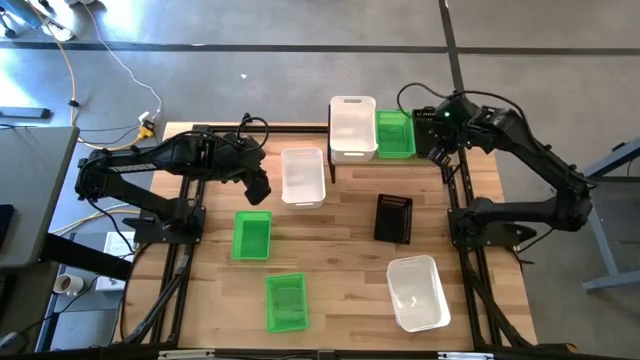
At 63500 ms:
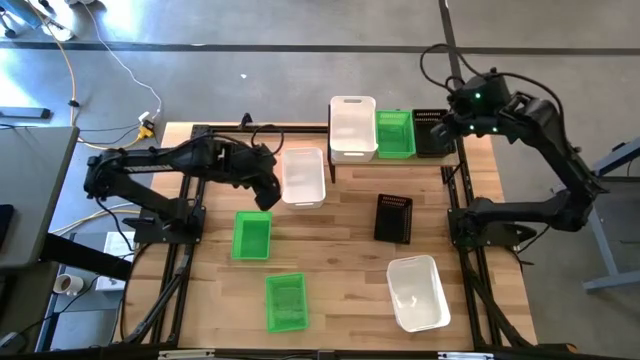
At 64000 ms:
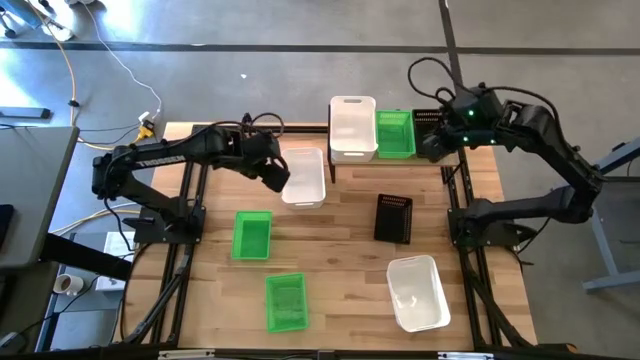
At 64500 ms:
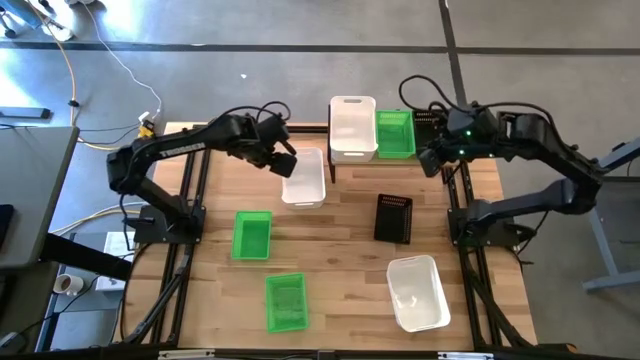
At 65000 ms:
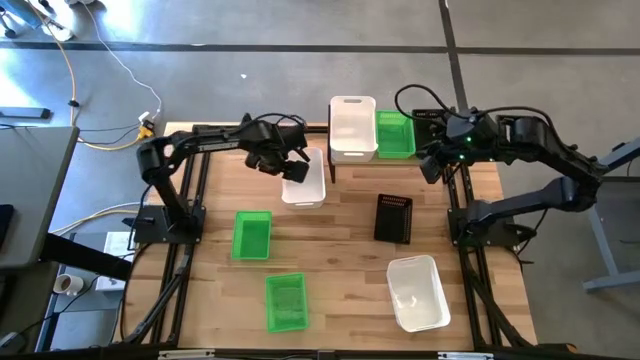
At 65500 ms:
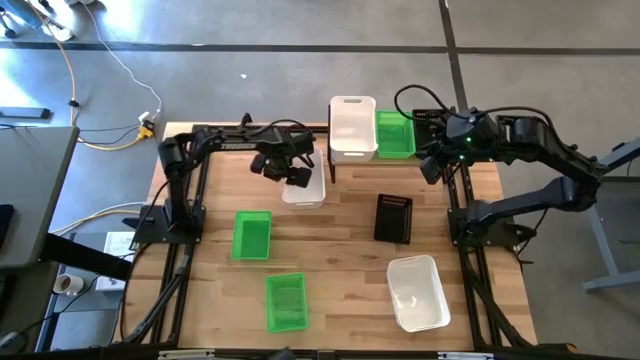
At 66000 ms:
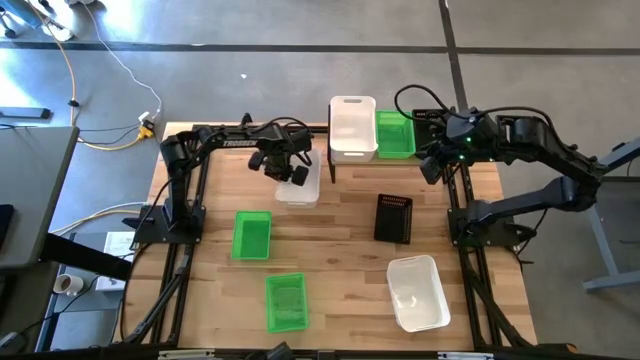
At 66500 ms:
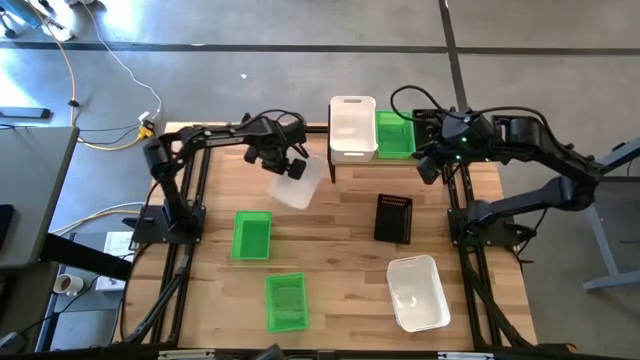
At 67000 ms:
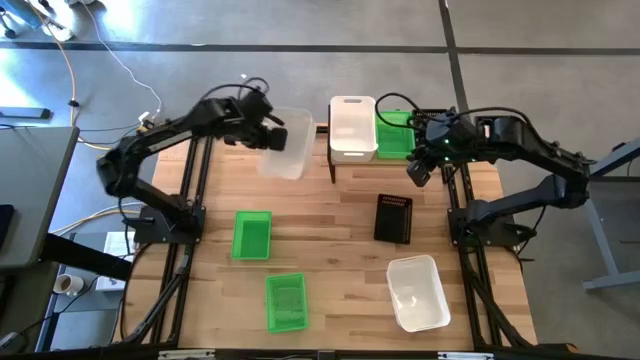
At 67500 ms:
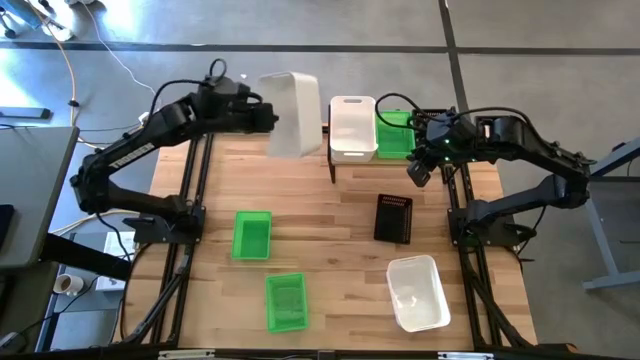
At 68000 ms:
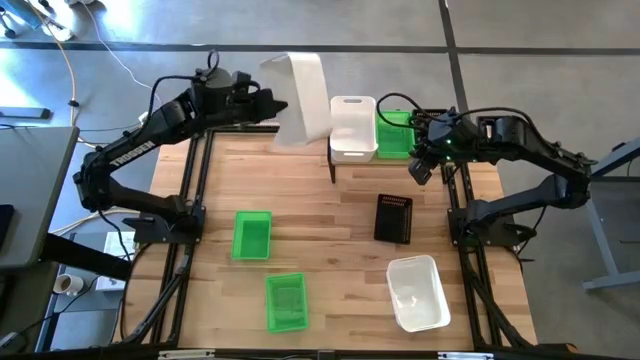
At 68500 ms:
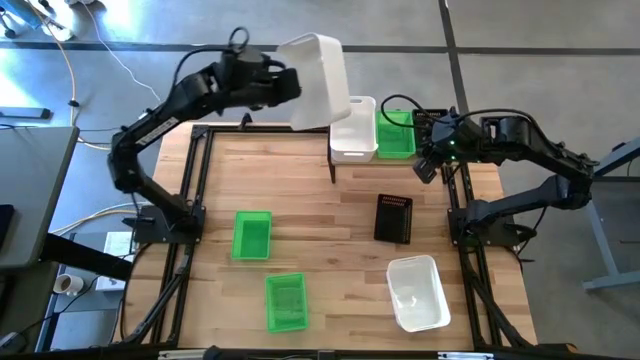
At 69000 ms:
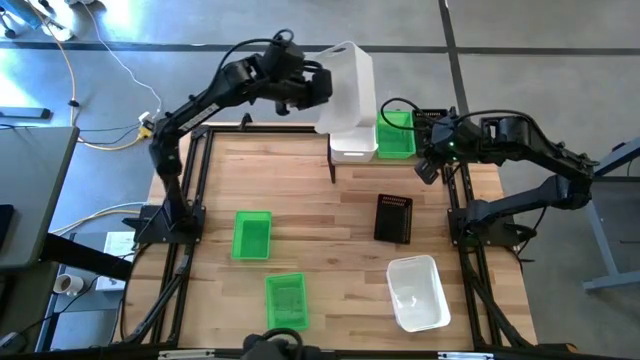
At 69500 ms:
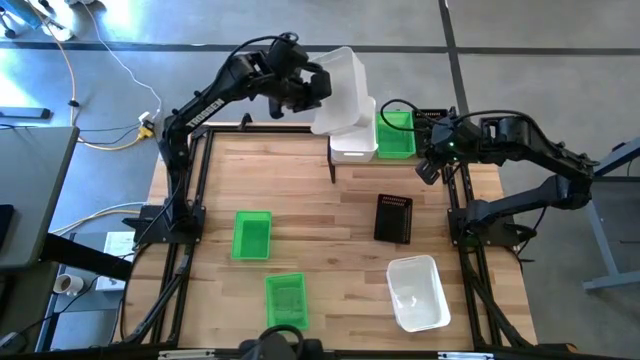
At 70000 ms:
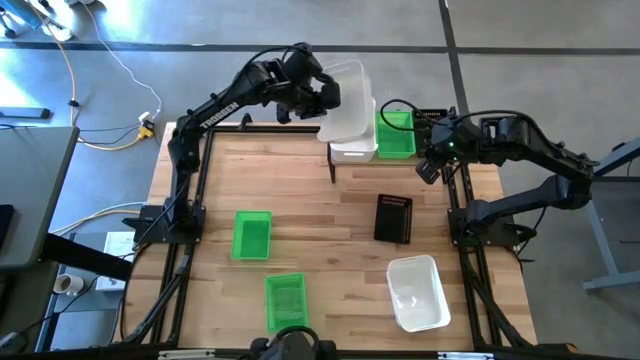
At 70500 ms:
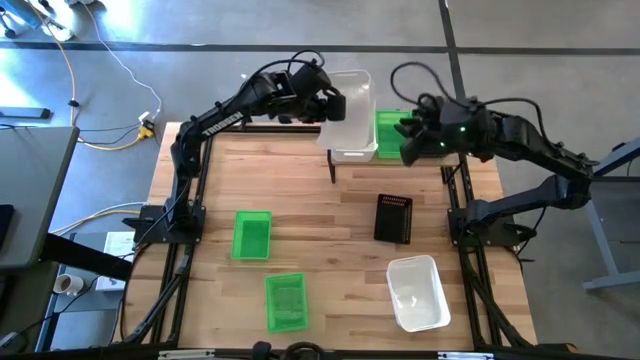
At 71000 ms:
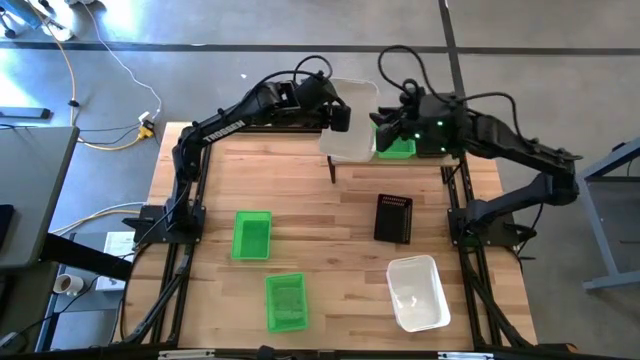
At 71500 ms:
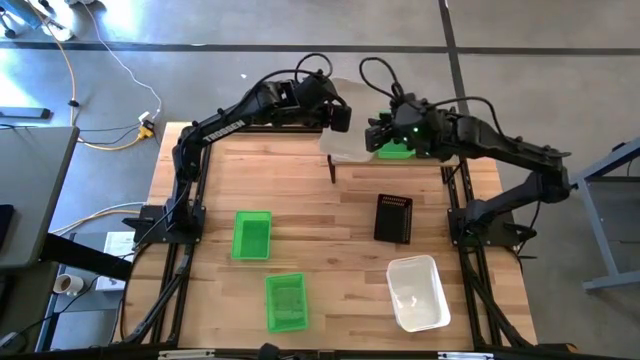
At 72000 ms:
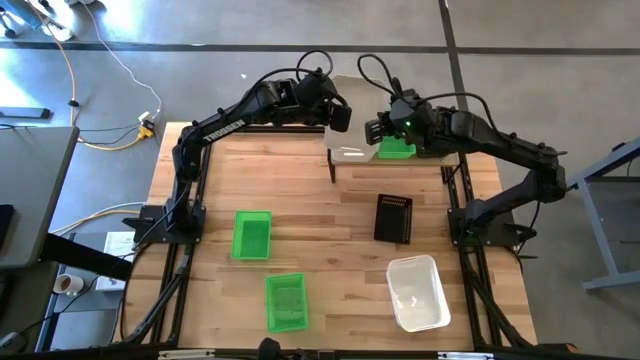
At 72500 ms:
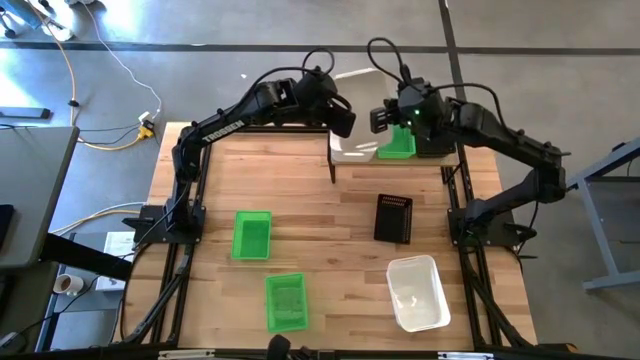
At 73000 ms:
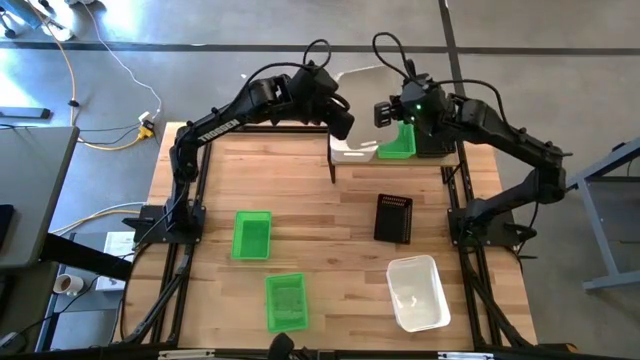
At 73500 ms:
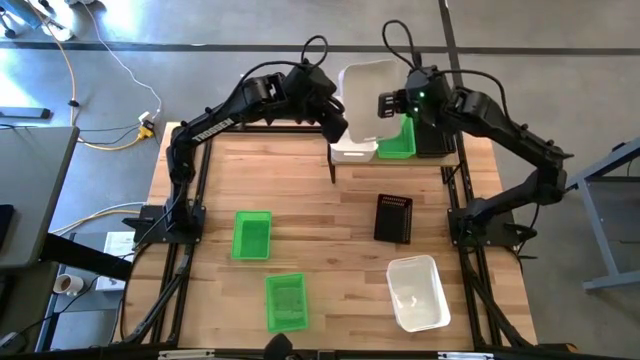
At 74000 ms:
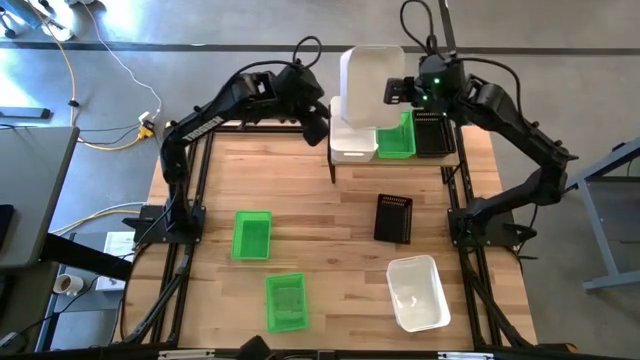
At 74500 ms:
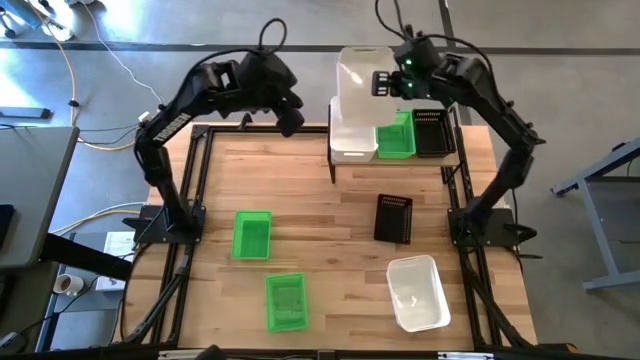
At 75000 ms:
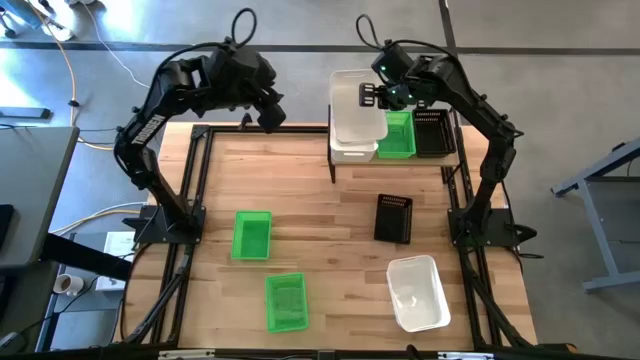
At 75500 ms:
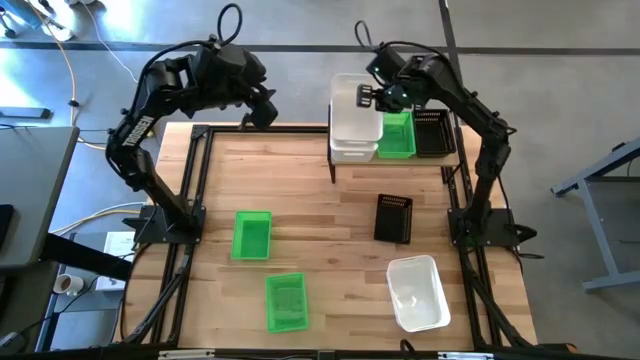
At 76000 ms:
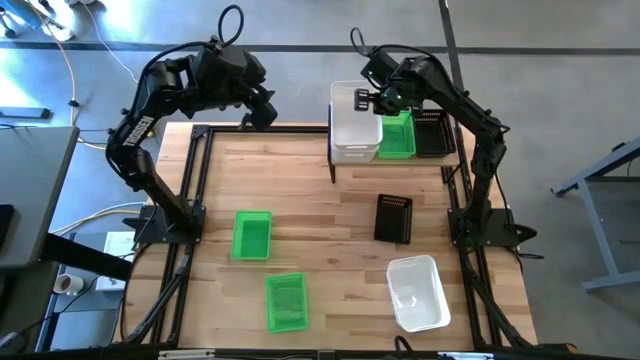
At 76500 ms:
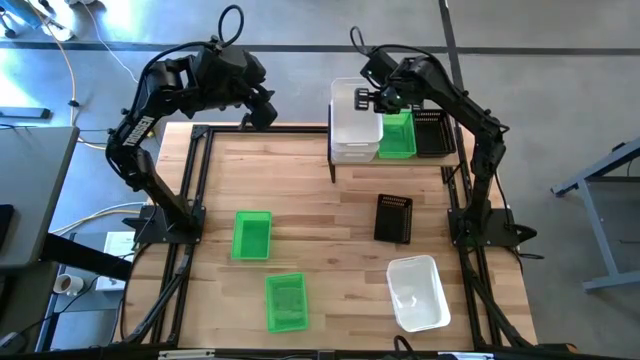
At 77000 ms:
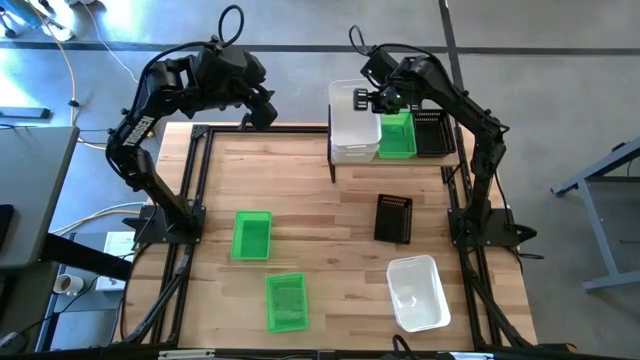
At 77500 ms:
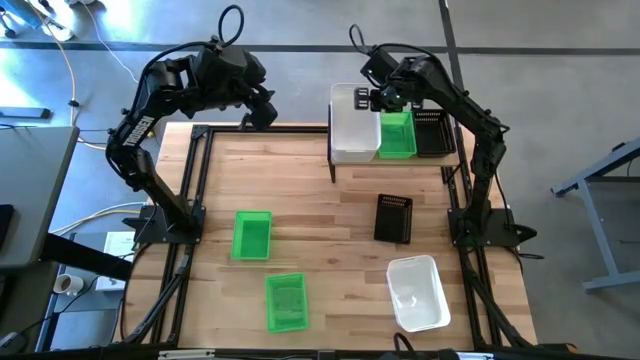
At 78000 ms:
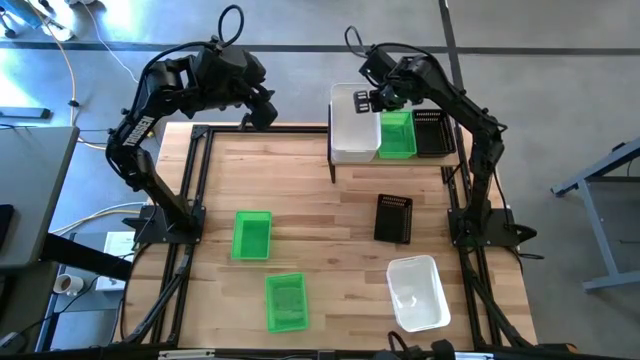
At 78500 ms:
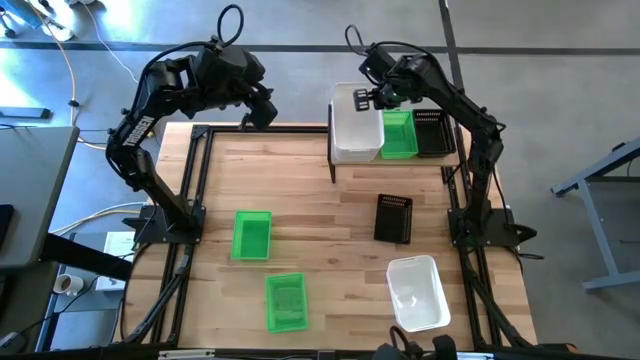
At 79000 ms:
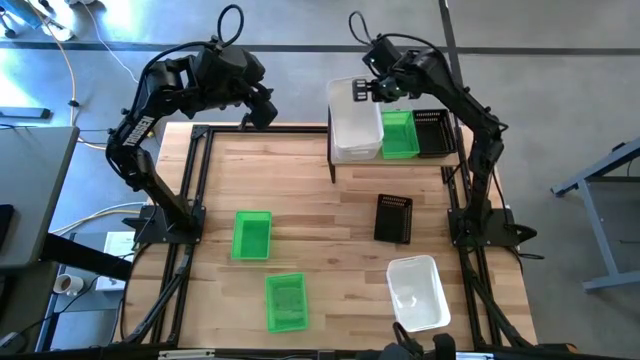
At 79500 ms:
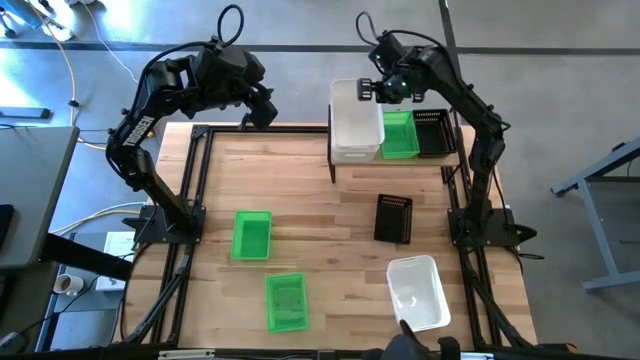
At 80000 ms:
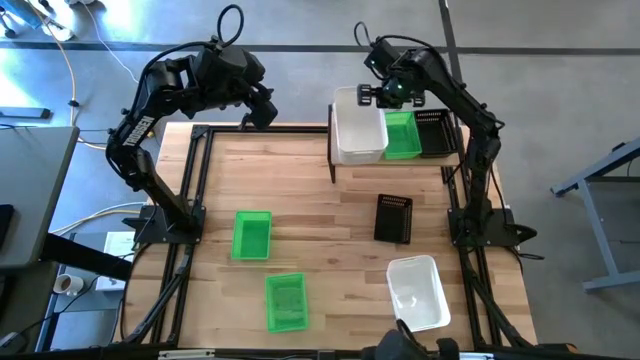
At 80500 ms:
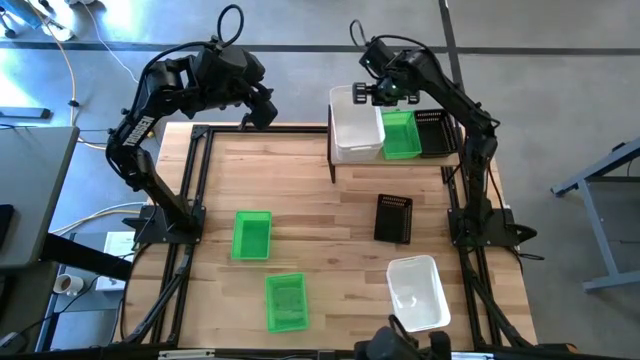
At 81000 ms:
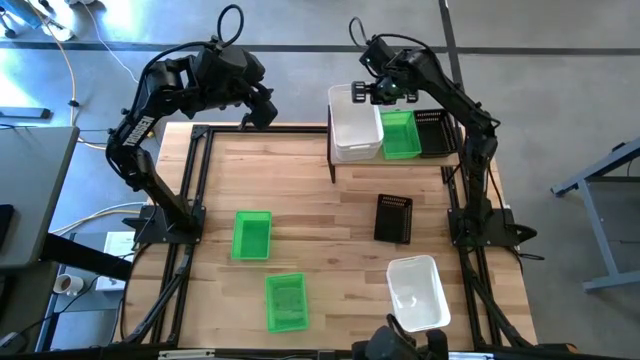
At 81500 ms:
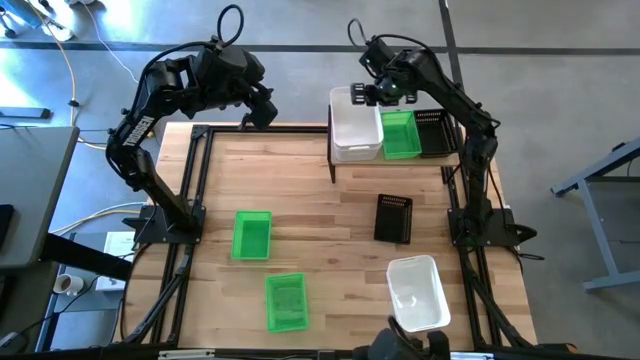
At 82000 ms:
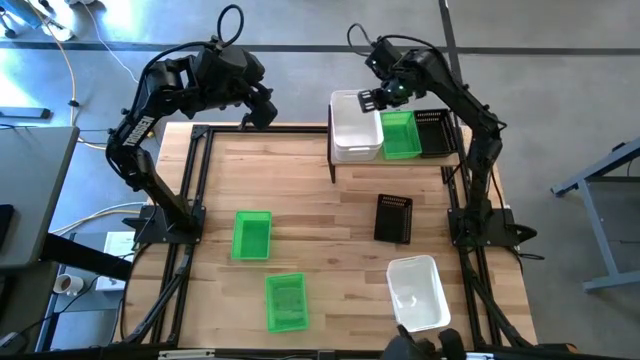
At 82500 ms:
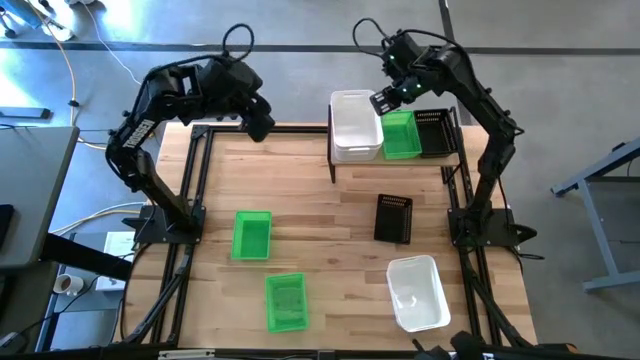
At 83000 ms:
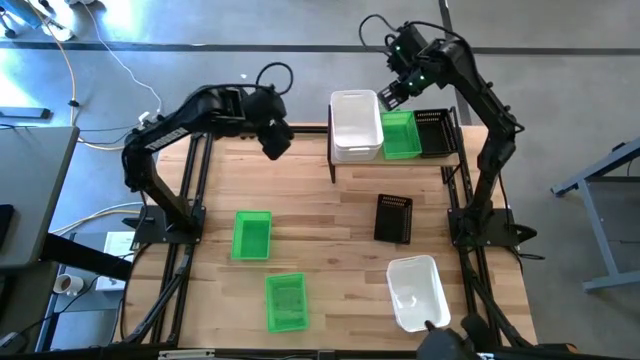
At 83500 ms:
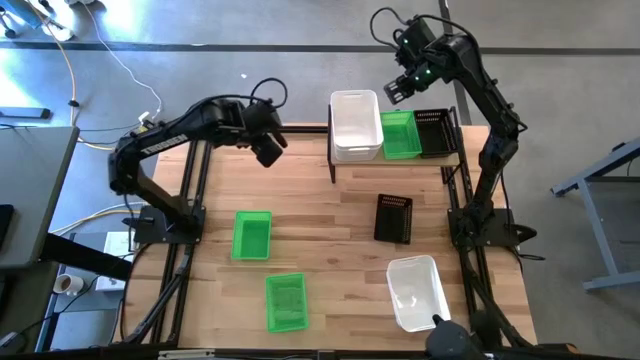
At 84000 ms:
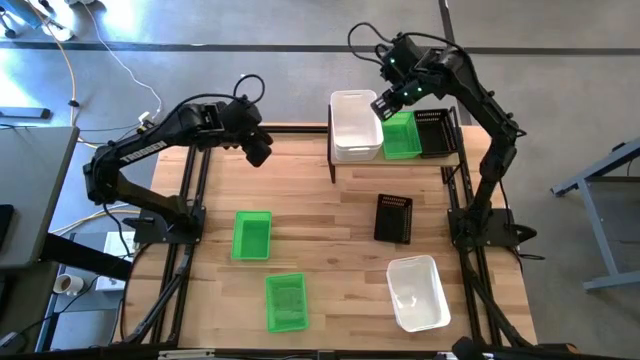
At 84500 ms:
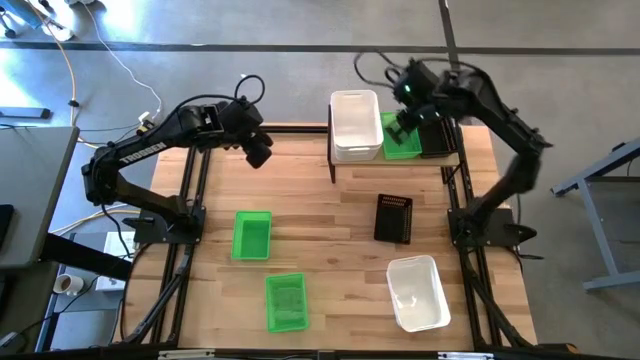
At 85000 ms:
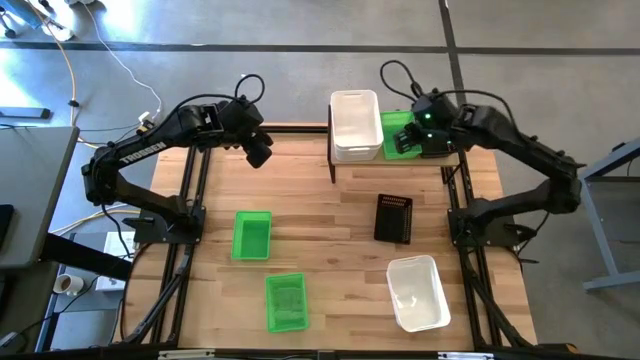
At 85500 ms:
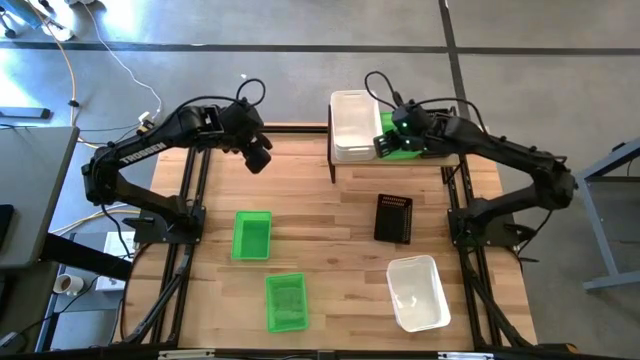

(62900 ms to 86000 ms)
Task: Stack baskets on shelf by color
Stack the top white bin on top of the white bin
